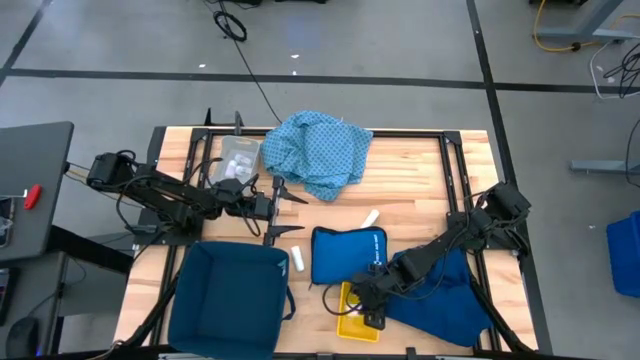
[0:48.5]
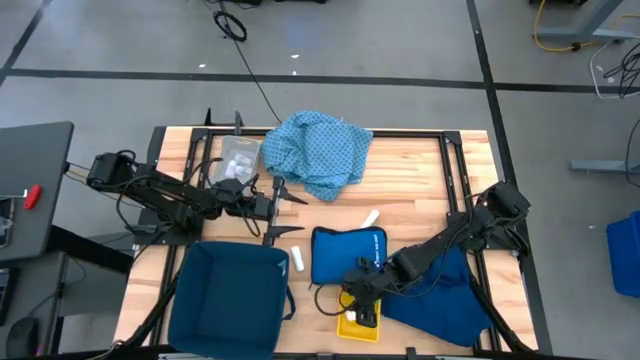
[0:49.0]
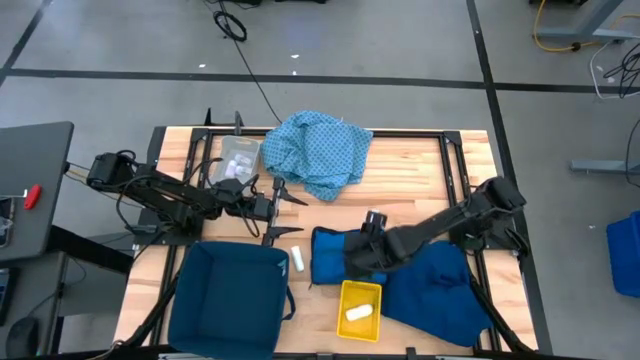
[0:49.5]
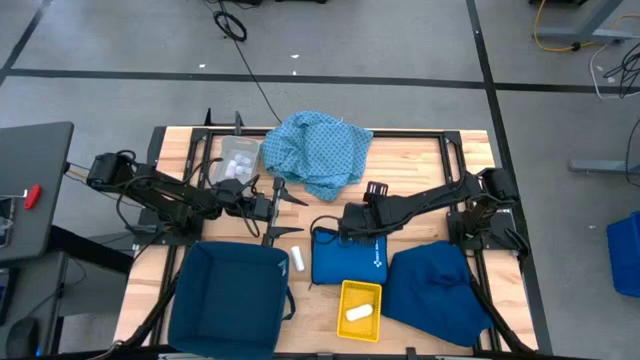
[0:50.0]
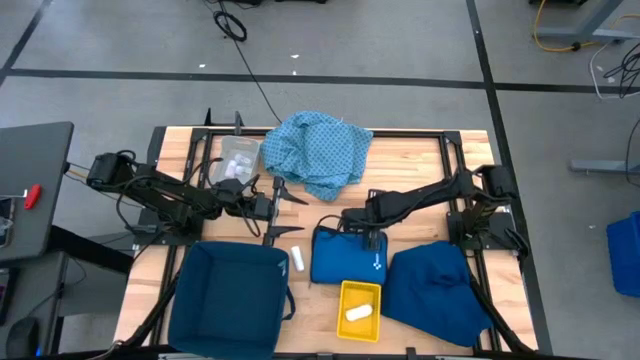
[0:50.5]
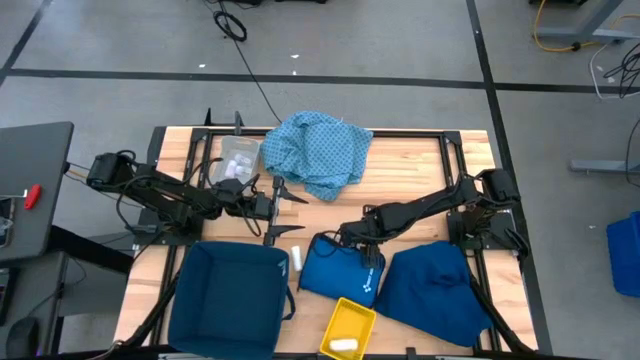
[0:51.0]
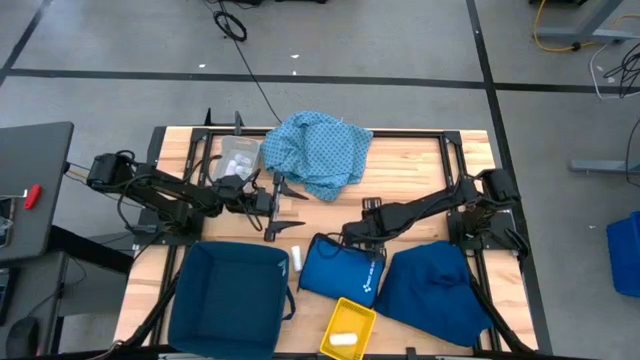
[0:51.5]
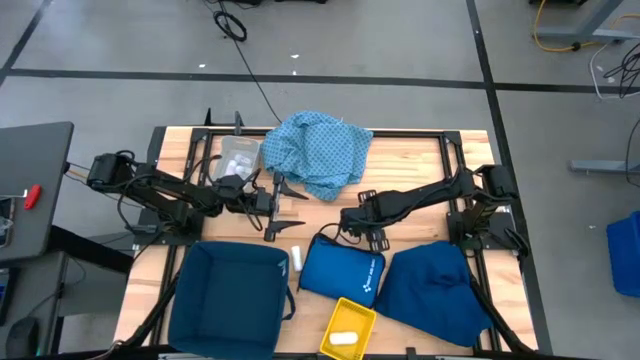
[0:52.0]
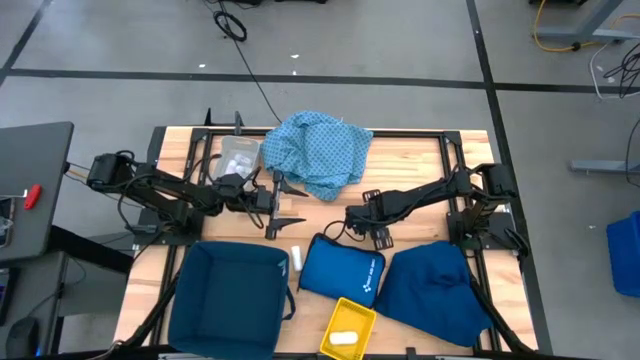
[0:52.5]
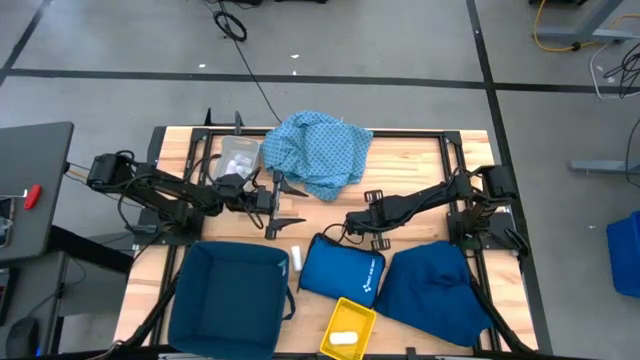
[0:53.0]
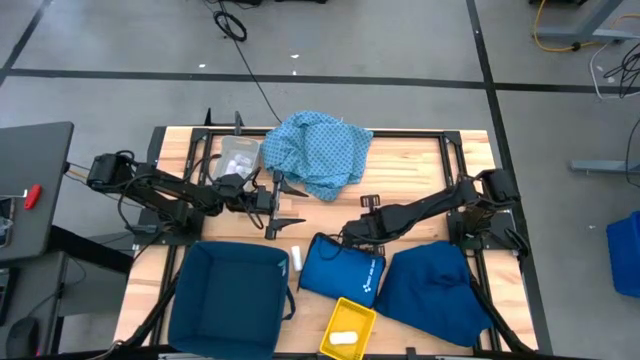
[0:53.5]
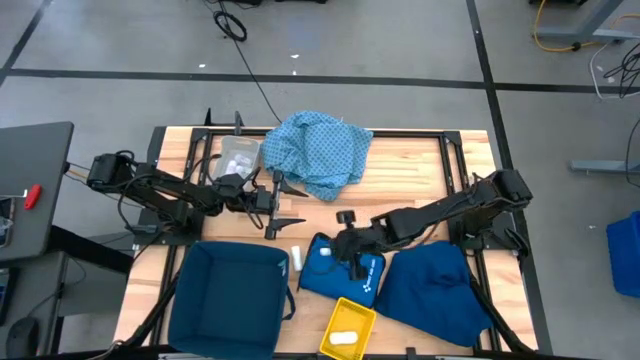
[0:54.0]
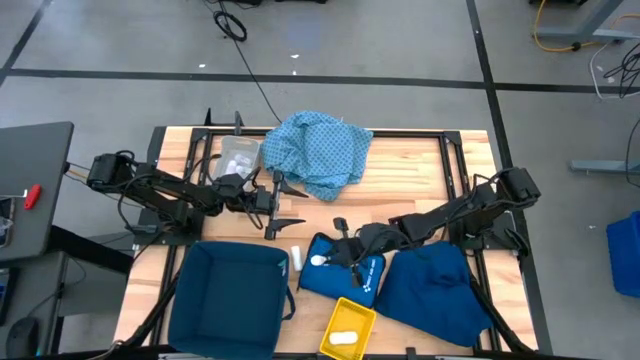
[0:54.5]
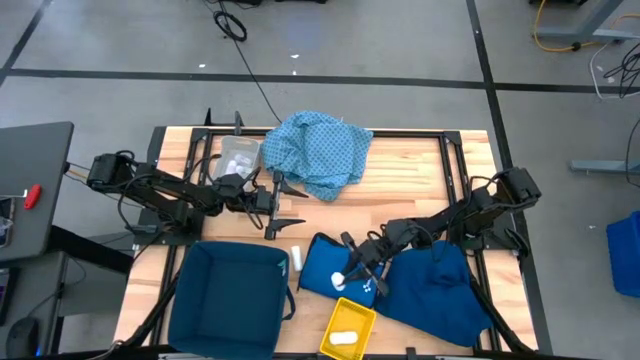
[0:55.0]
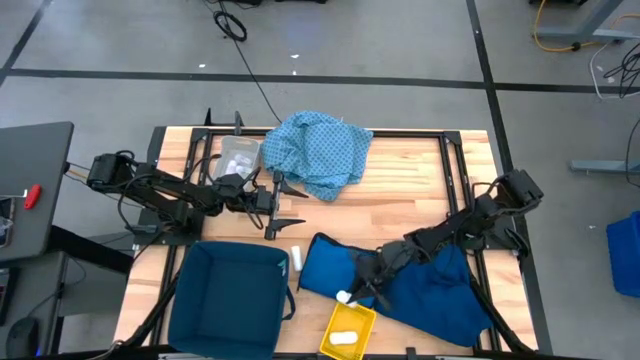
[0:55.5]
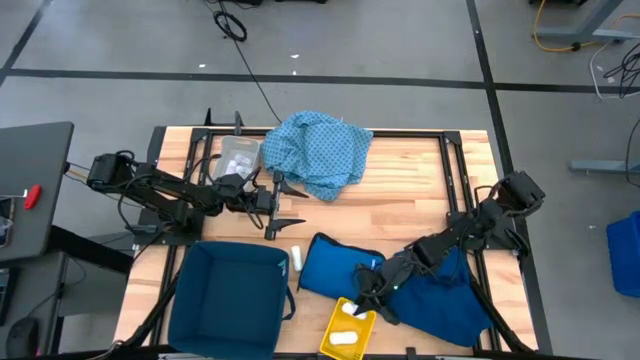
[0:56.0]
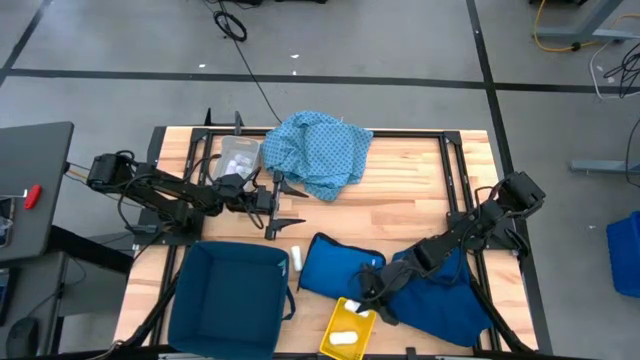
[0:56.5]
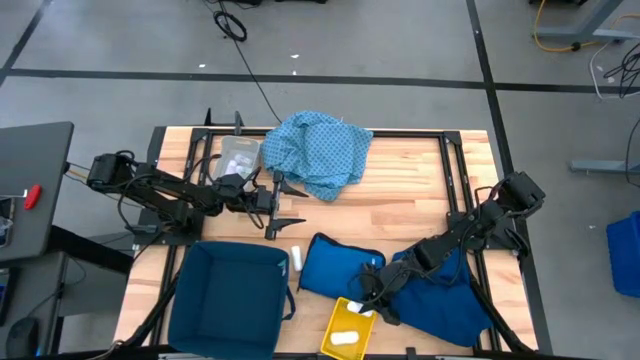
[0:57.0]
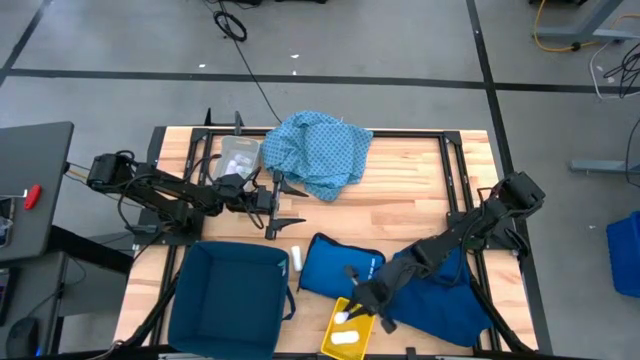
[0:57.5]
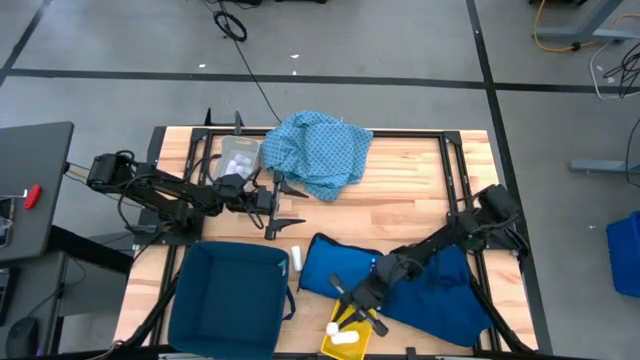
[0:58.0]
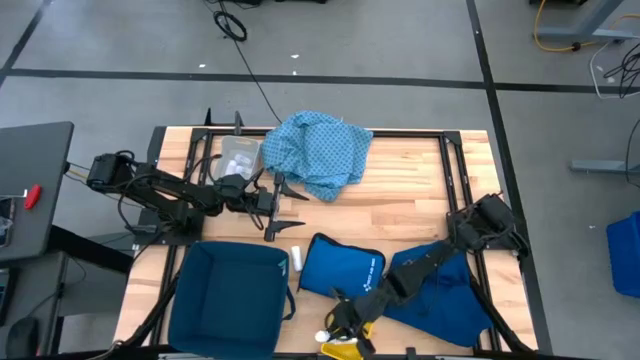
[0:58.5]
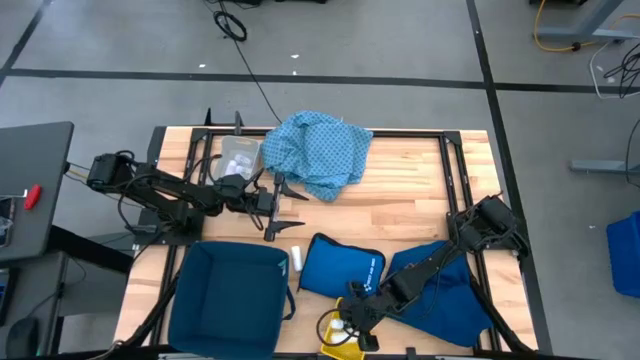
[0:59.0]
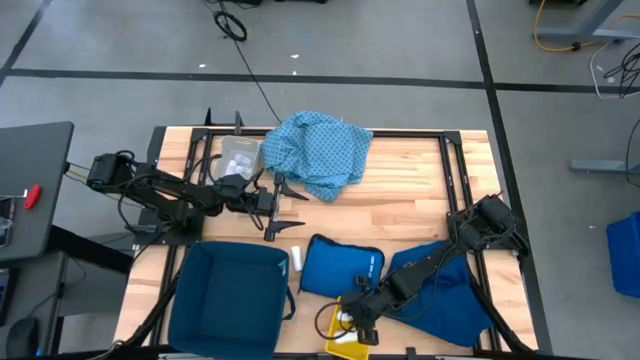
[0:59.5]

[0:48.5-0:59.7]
Task: Pick & place medical supplies in basket/bin
Put the right rolled gauze into the yellow bin

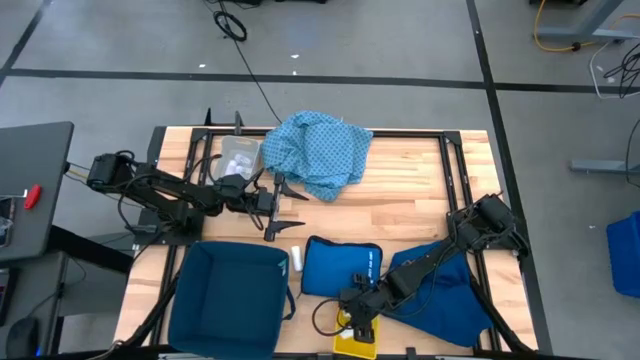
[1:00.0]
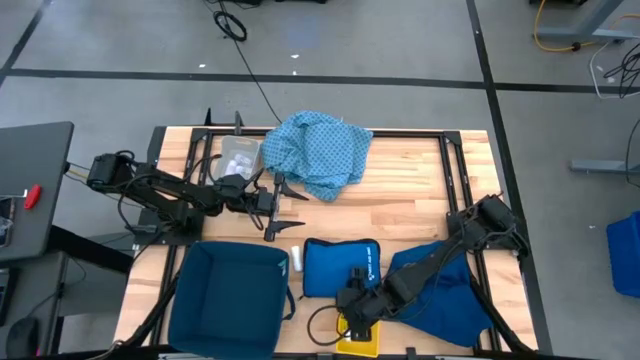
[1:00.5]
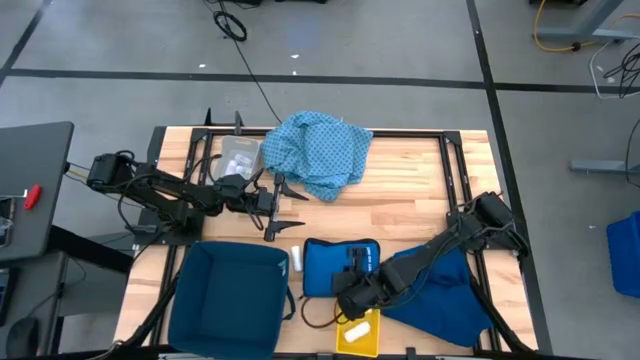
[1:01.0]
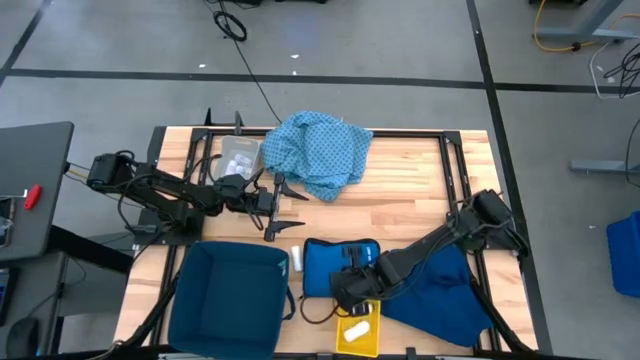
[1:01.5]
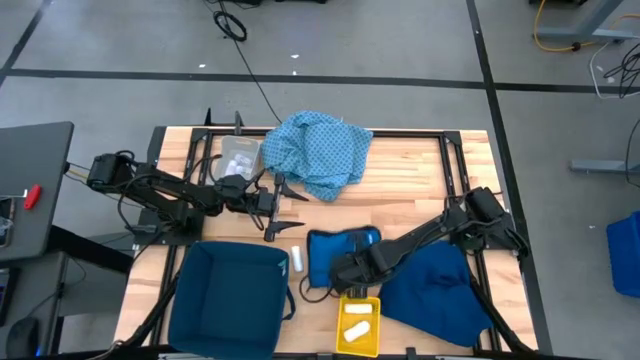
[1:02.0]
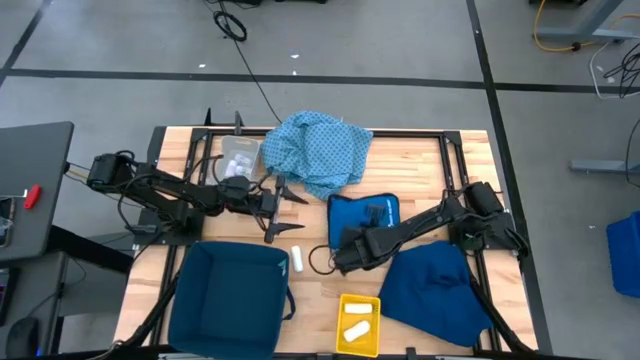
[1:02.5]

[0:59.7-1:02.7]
Adjust the first aid kit bag

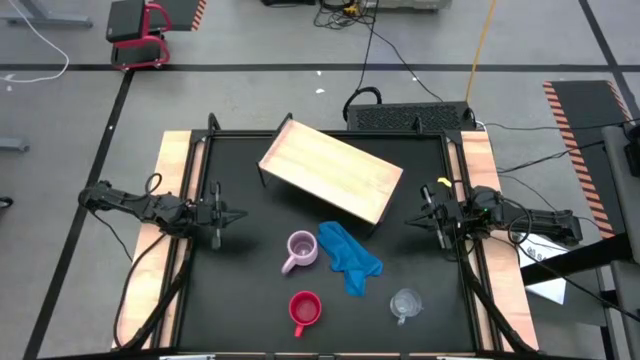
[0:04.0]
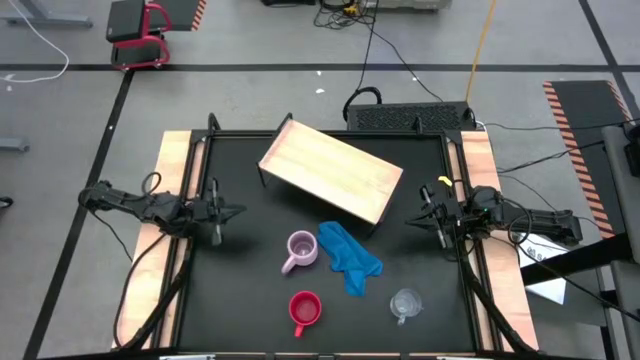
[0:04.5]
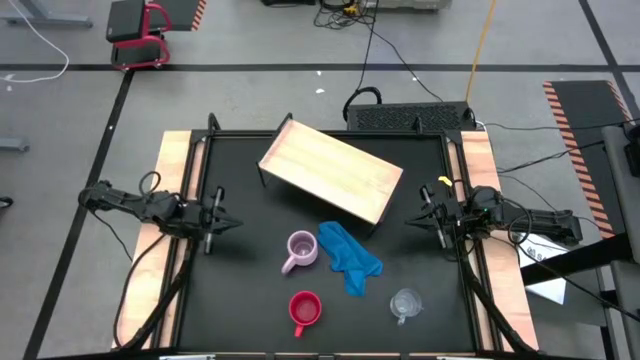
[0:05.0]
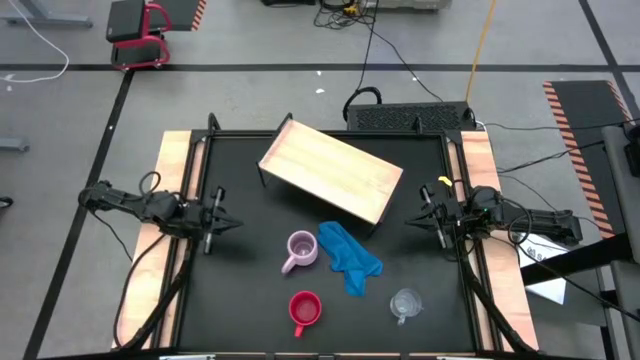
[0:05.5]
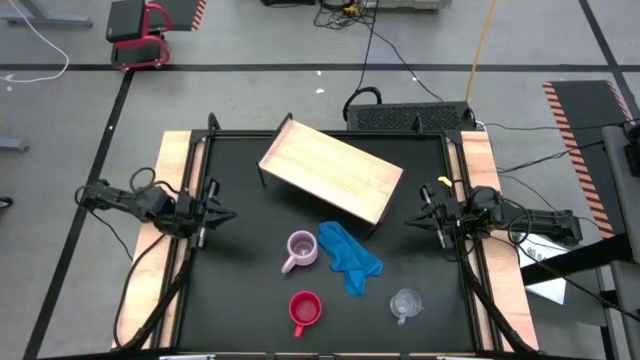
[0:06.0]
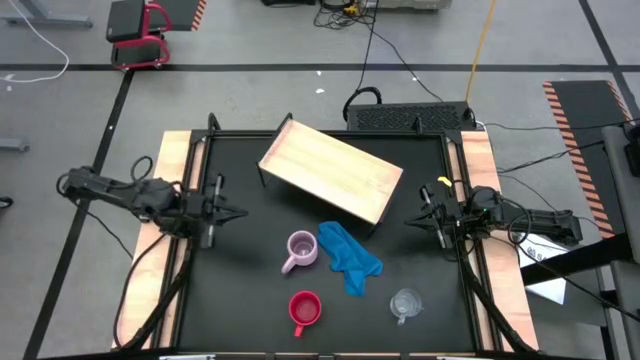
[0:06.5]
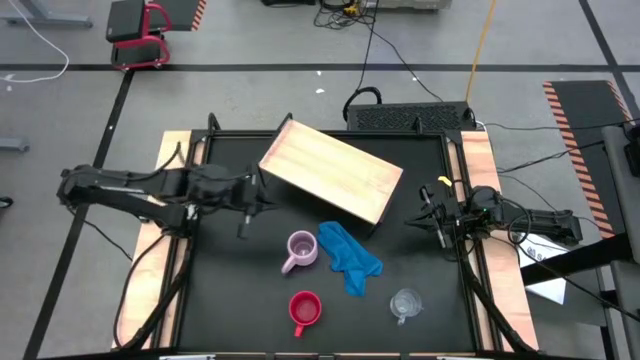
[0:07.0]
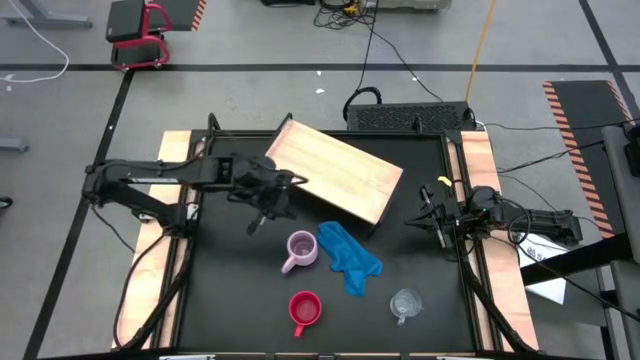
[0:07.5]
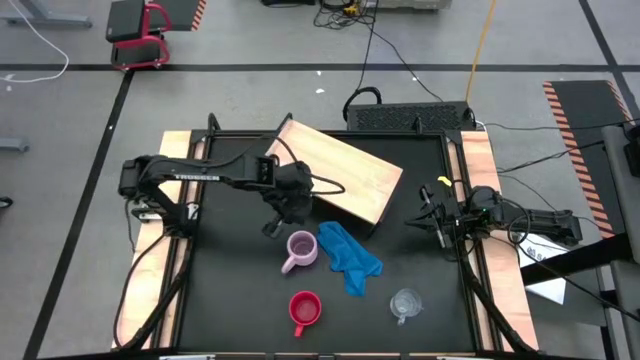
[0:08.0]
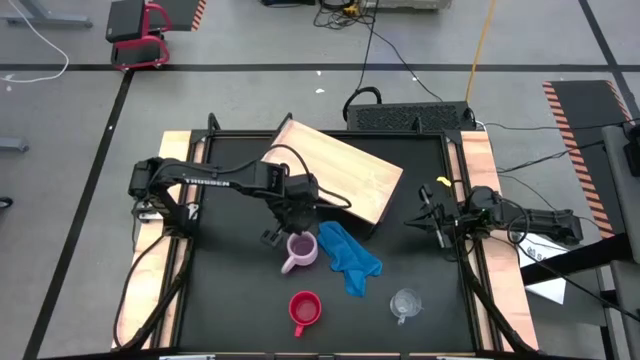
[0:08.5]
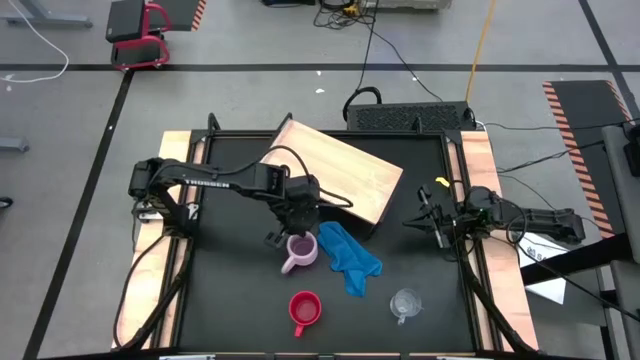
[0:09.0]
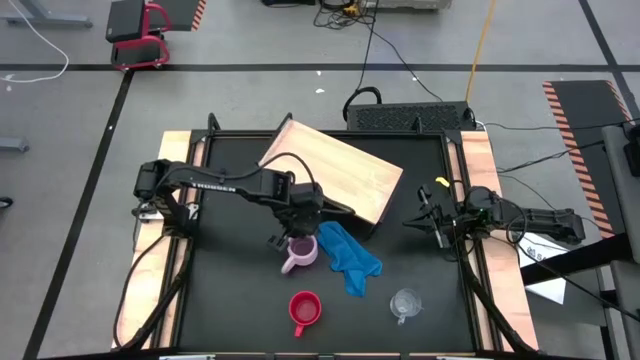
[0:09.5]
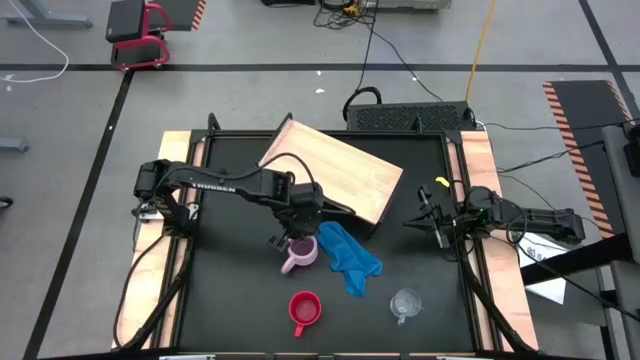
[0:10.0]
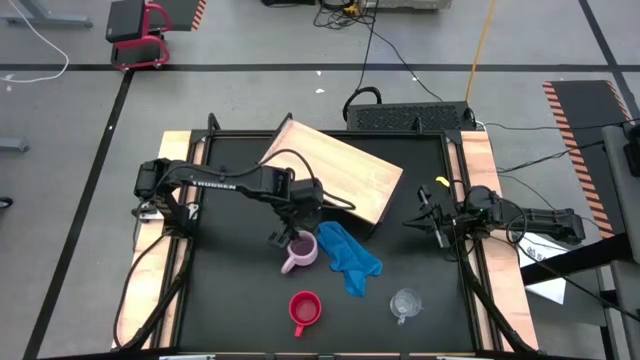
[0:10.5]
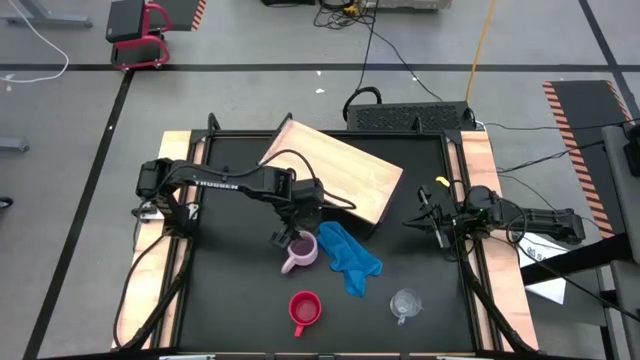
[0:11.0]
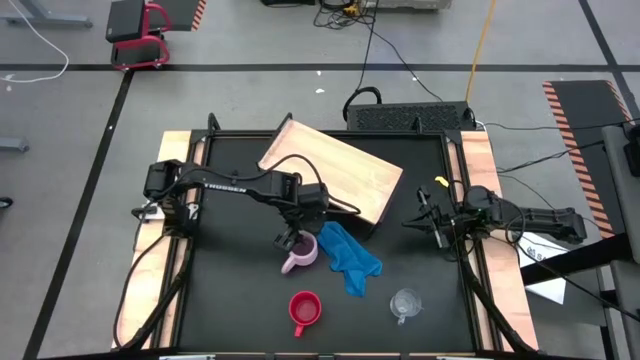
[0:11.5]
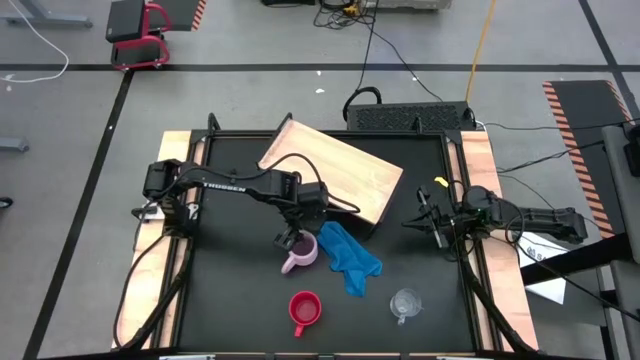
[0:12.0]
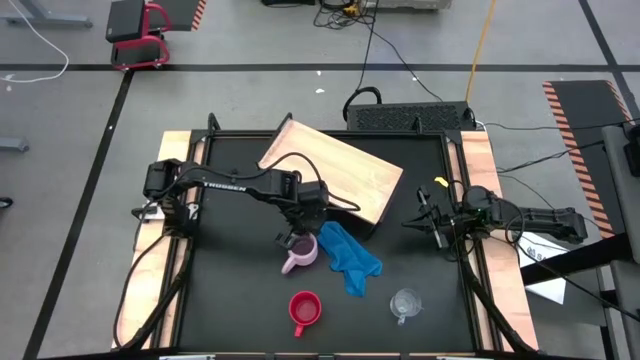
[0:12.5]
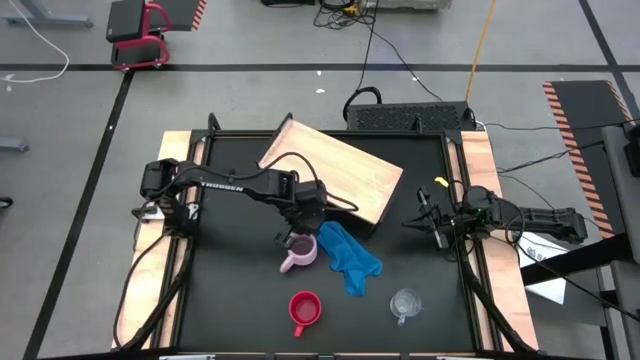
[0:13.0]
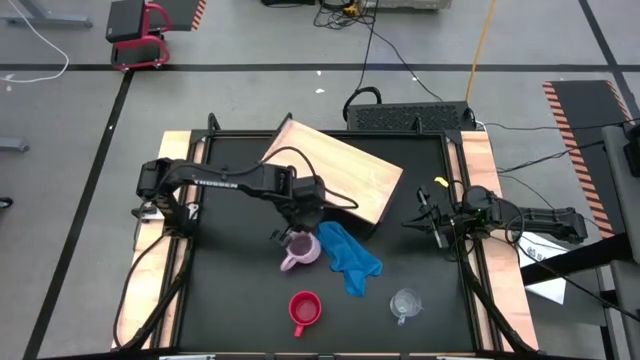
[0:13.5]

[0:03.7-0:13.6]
Task: Stack small to large cups/mugs on shelf
Put the pink mug on the shelf
